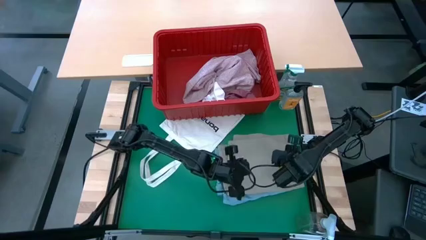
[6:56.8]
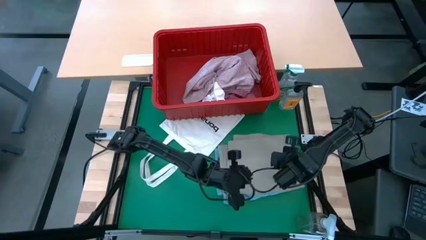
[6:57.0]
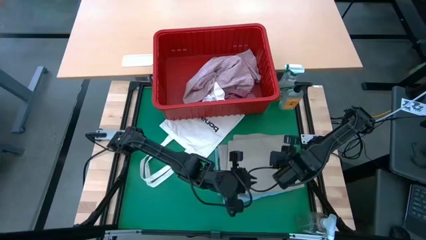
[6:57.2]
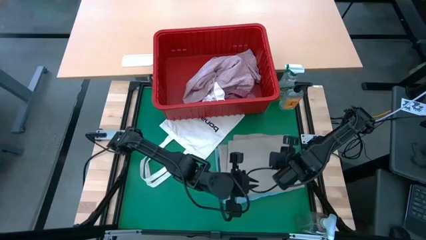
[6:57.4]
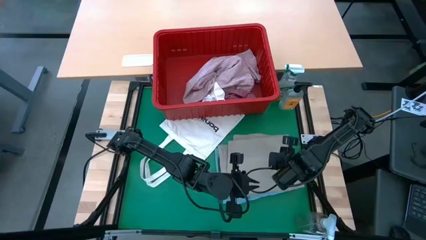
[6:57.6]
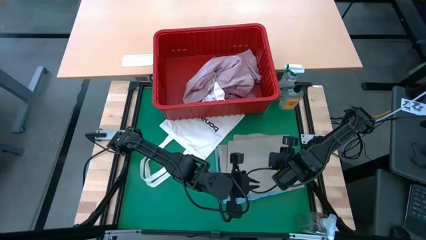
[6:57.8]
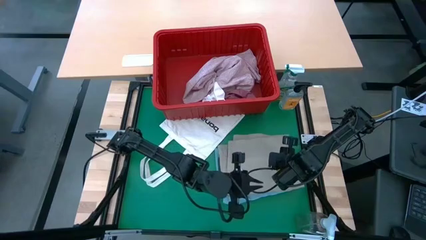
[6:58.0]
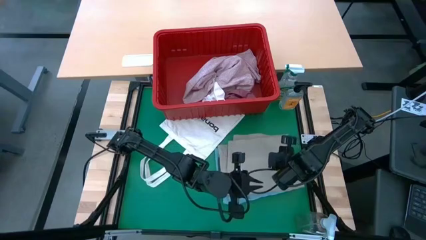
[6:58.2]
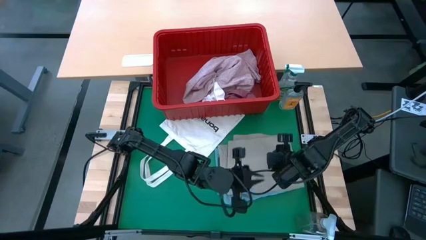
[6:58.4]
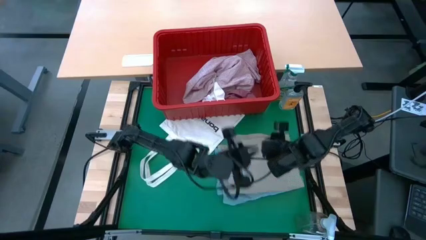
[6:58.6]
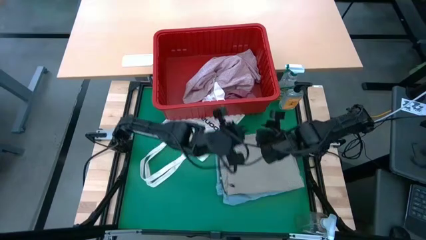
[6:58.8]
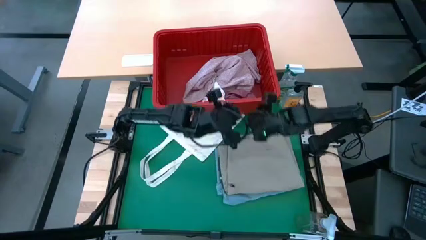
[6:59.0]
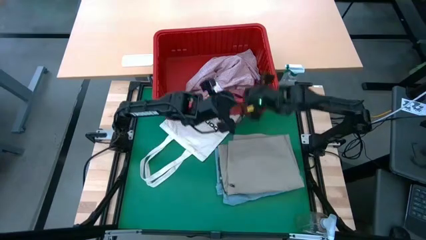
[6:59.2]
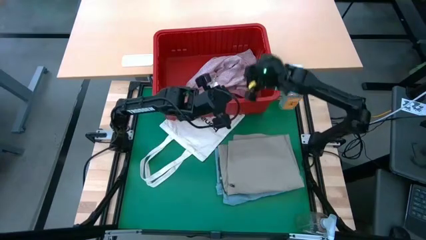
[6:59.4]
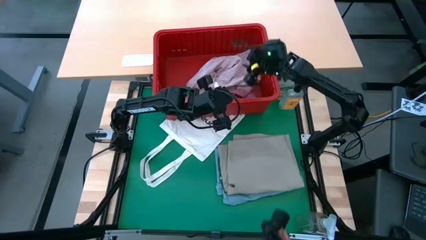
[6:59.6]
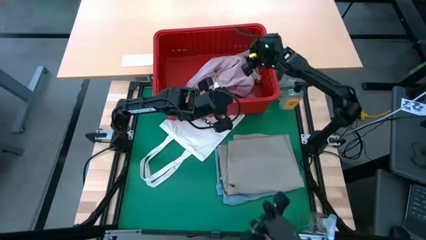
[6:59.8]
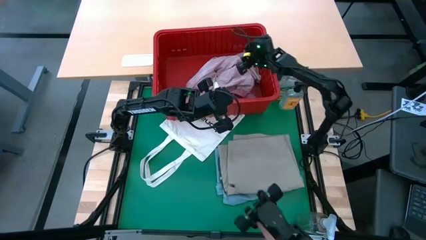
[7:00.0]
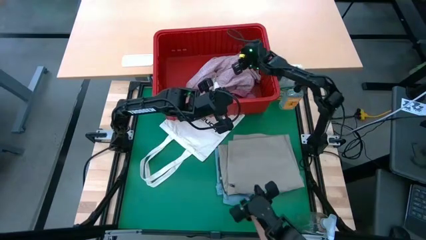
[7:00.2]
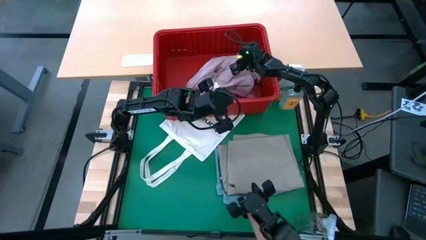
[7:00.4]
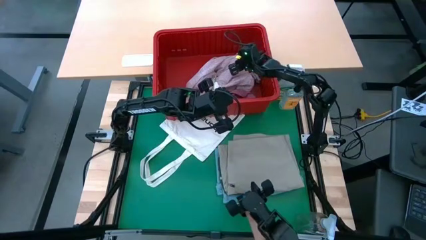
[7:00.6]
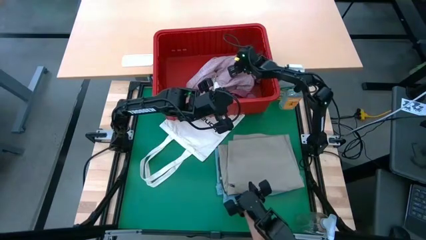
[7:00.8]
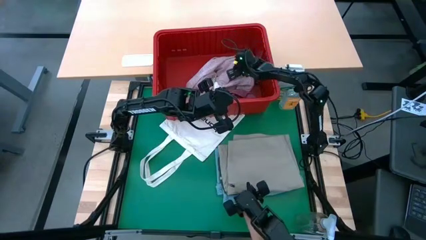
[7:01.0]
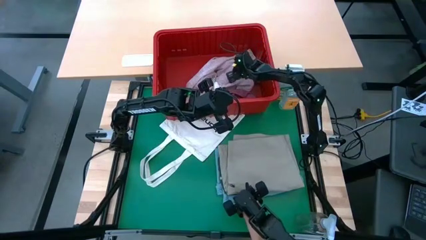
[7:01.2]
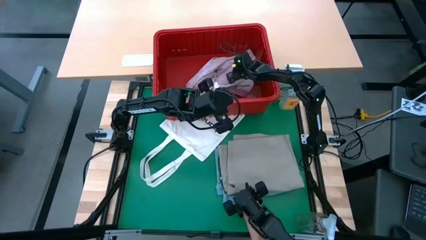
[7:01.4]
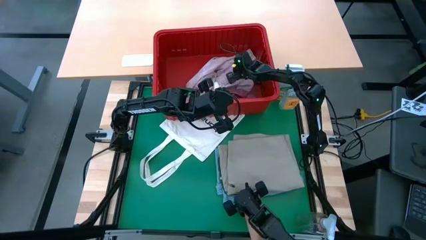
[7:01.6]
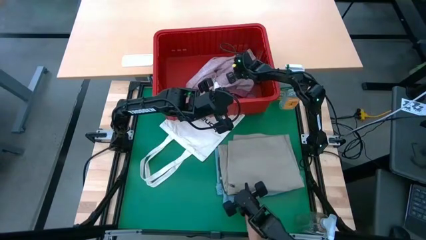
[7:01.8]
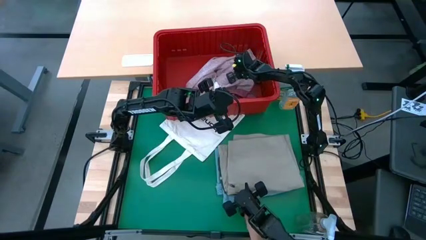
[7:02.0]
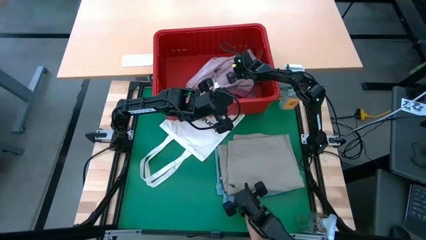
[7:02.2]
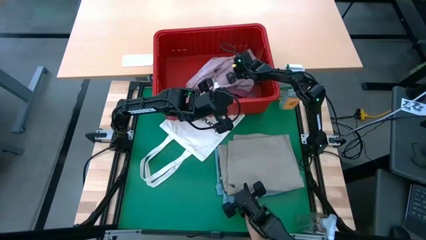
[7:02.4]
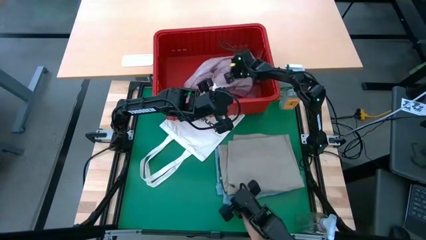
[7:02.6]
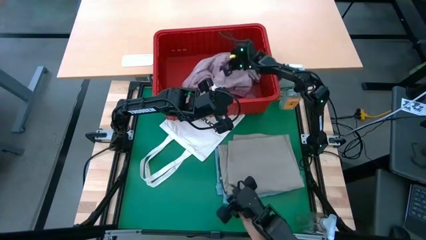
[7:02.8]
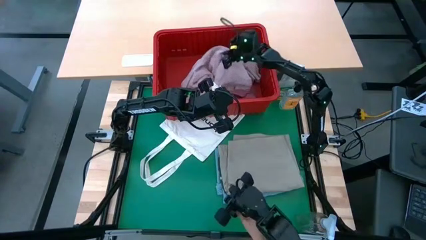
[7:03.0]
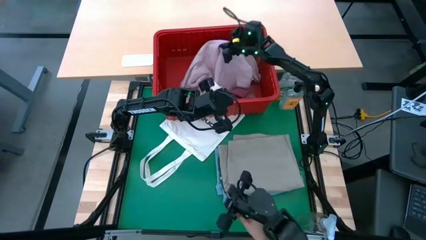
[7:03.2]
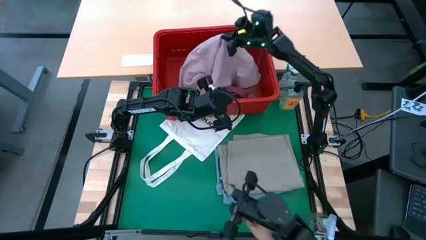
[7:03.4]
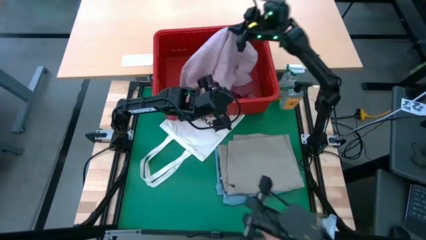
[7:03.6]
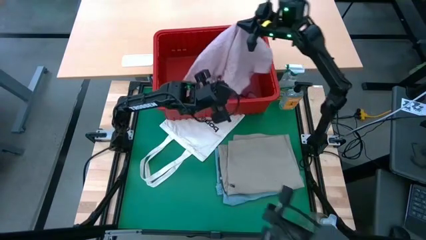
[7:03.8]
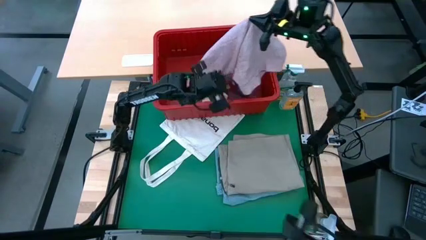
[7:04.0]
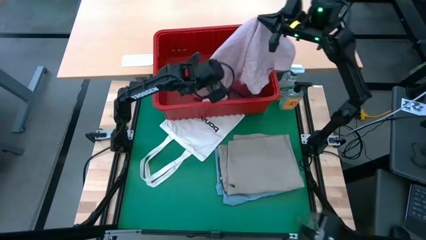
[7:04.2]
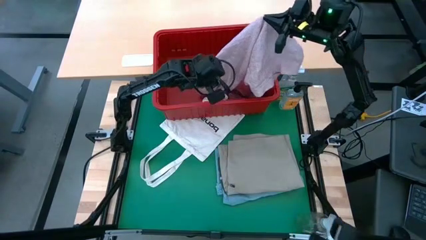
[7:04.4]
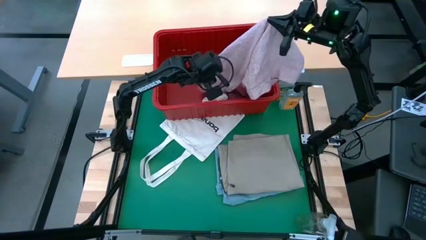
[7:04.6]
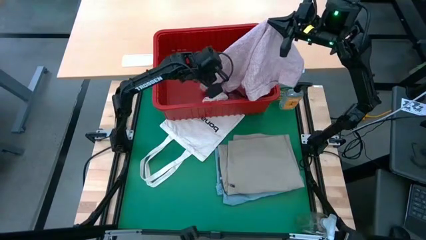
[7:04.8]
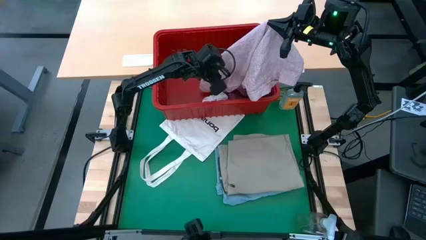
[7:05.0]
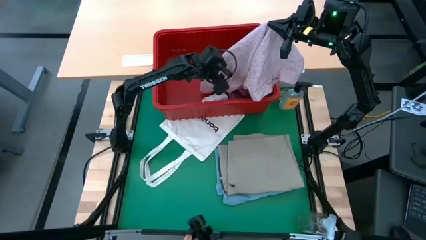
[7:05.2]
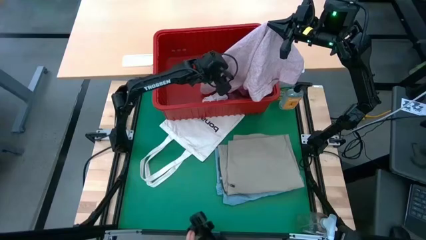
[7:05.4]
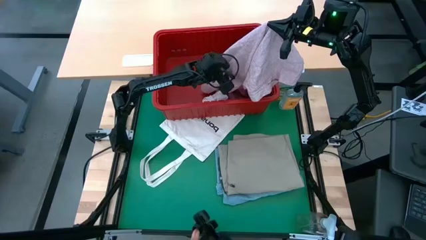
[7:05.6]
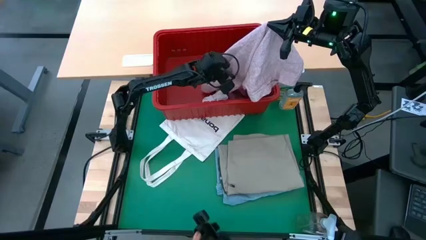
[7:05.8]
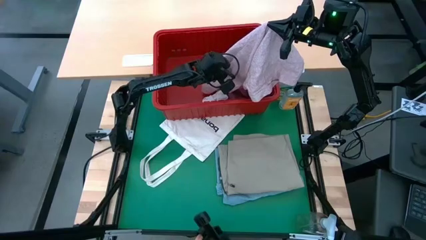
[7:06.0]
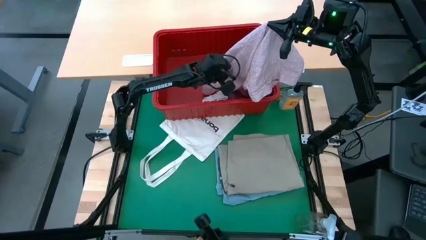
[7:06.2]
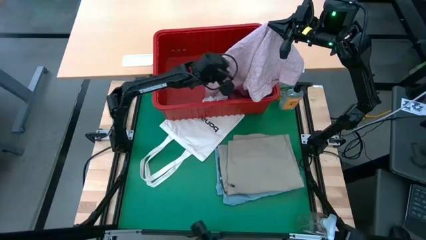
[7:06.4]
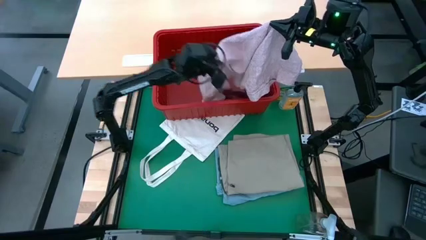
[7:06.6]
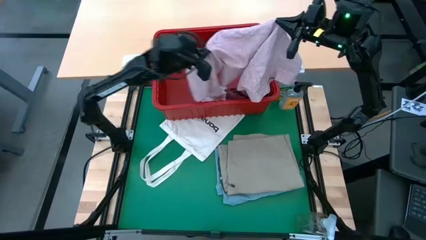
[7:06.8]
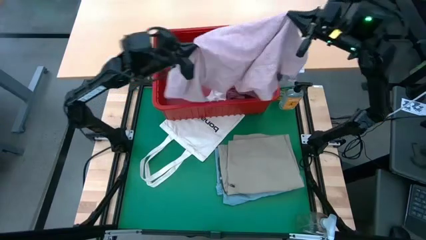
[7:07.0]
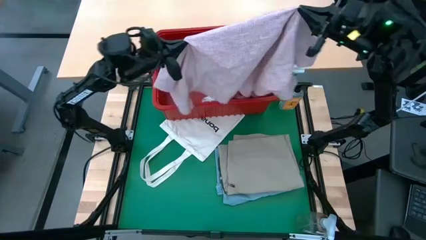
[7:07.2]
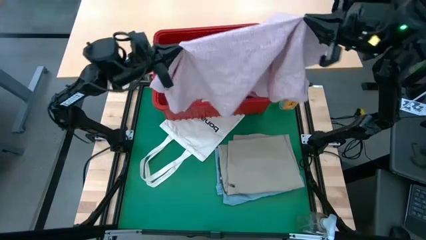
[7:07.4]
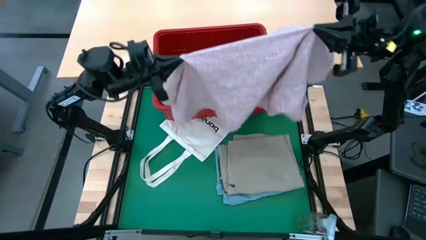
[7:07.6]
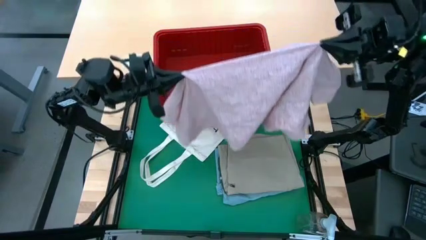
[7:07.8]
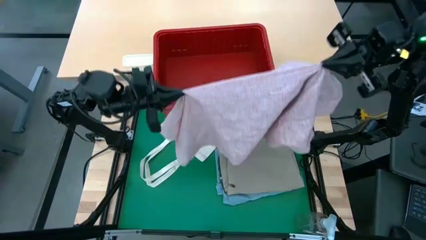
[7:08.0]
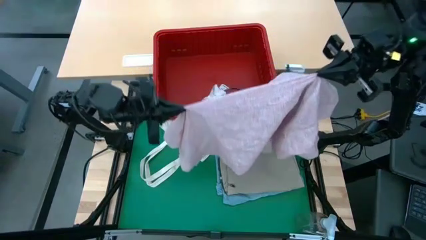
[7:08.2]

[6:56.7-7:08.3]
Task: Fold laundry
Fold the pink shirt

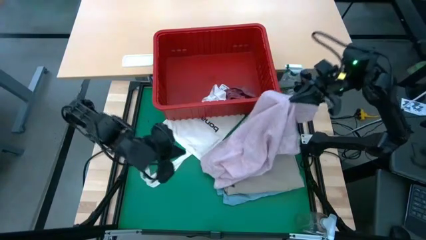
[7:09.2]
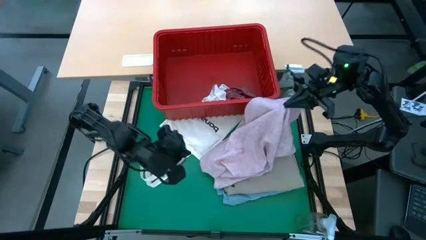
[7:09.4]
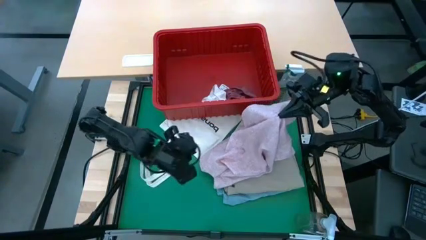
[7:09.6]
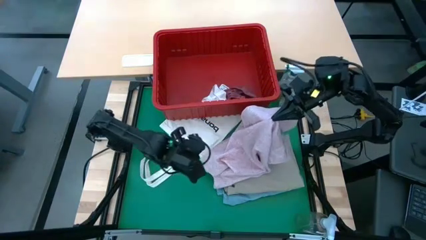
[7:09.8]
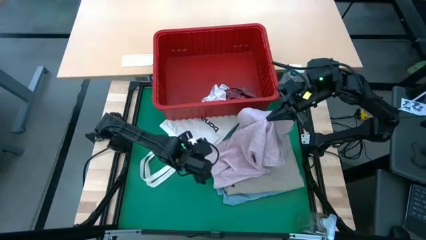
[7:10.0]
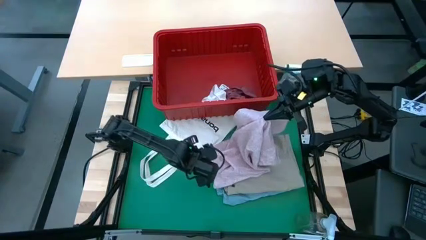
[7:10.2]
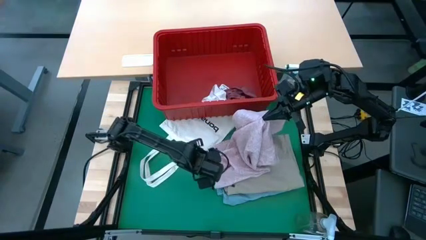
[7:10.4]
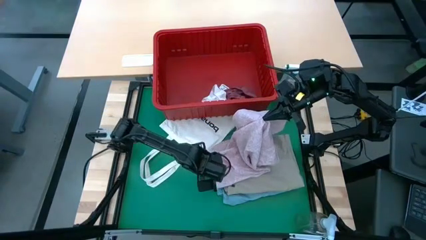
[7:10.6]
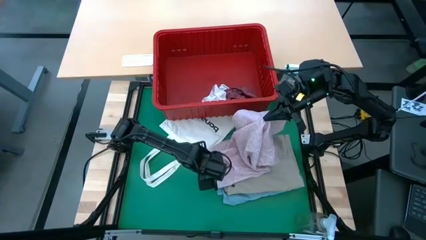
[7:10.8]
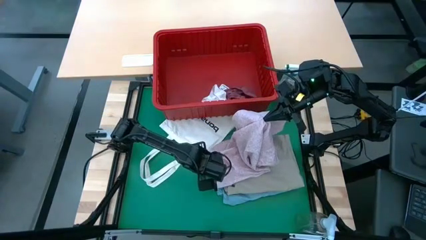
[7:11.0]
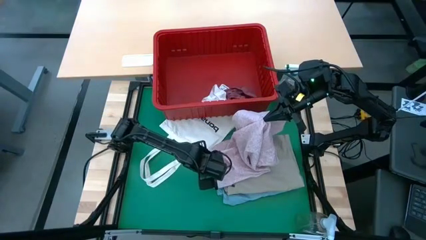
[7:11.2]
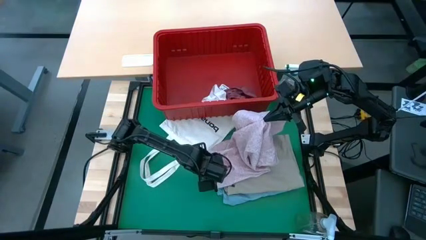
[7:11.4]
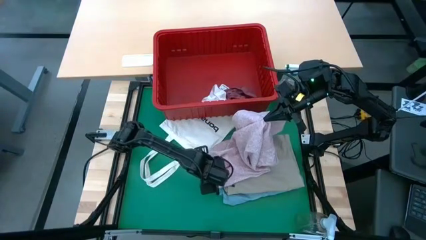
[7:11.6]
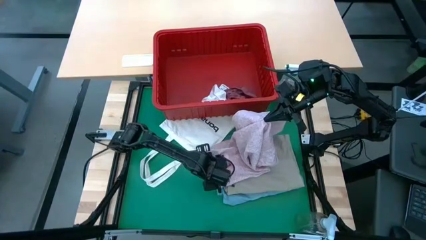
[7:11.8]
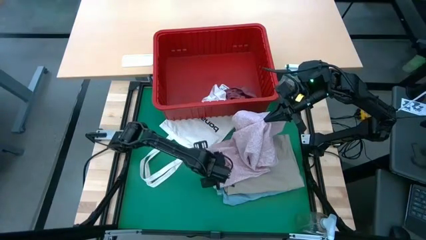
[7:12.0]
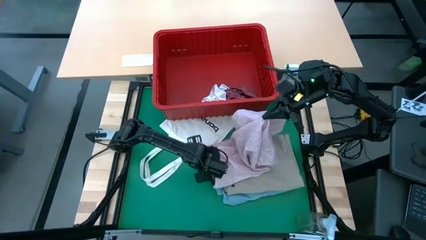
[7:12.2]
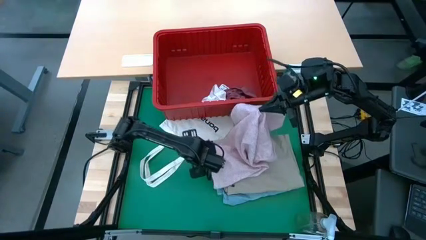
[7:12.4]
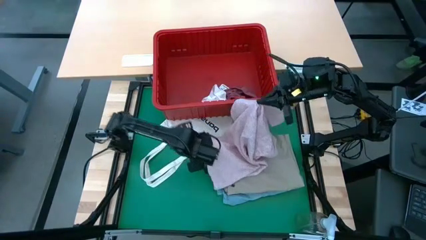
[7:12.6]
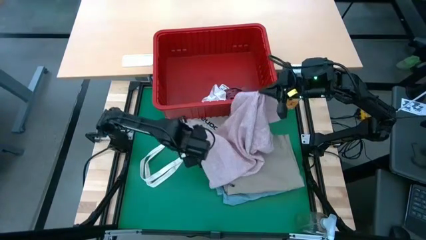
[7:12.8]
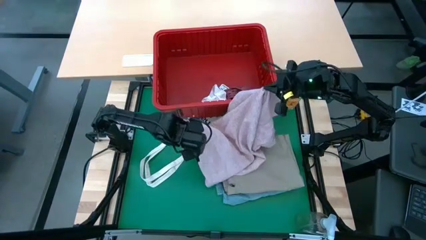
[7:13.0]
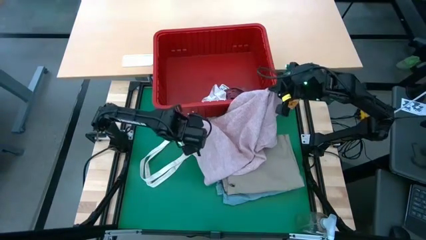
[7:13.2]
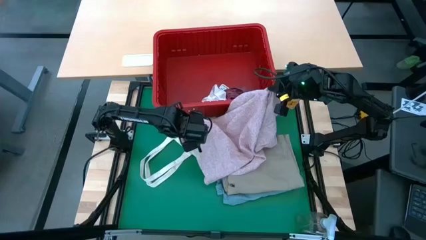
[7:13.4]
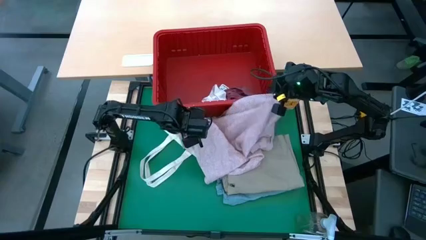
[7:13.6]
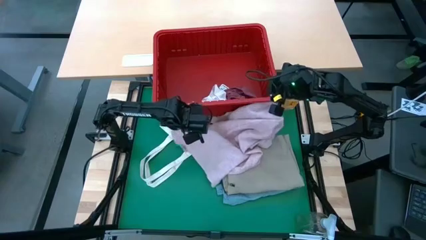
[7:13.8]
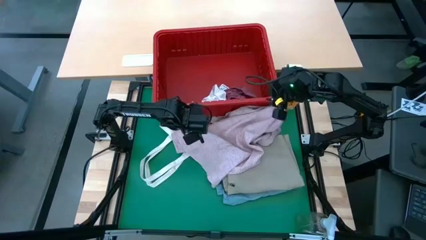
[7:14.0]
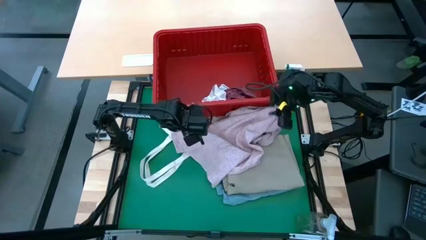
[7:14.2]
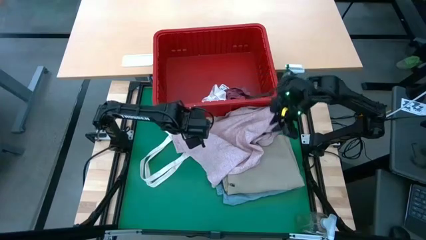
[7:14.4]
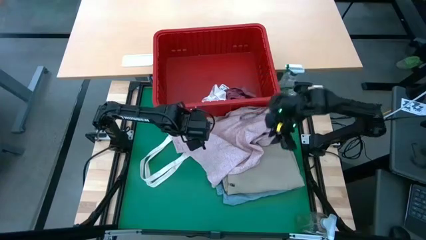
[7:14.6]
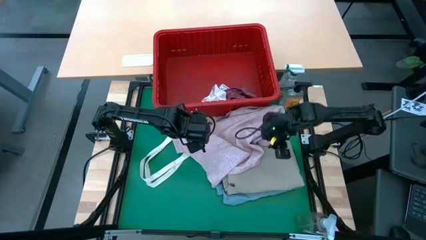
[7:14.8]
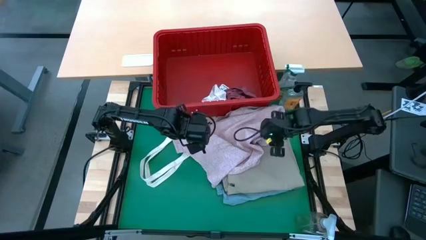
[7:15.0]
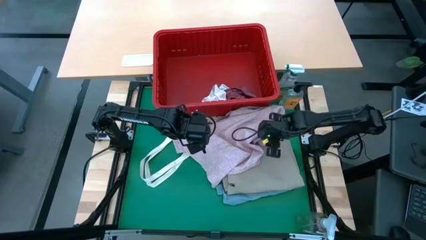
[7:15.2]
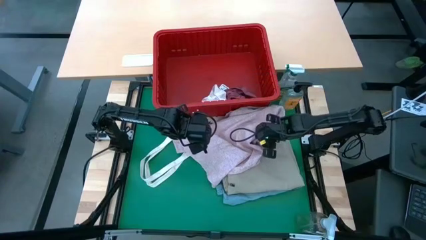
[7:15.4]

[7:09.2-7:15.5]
Fold the pink shirt

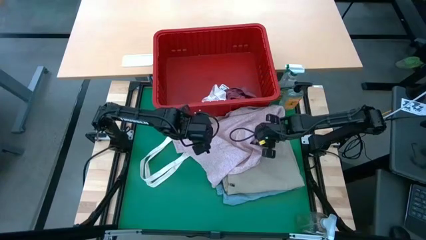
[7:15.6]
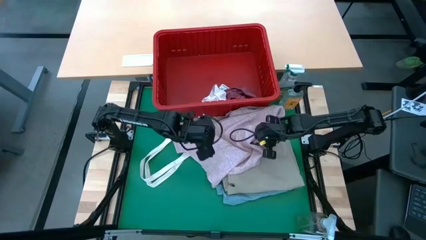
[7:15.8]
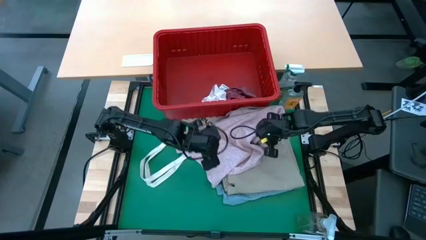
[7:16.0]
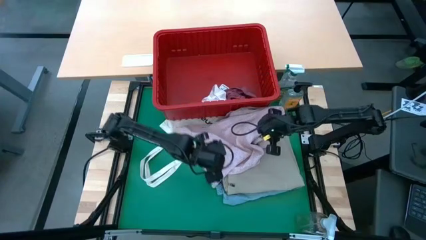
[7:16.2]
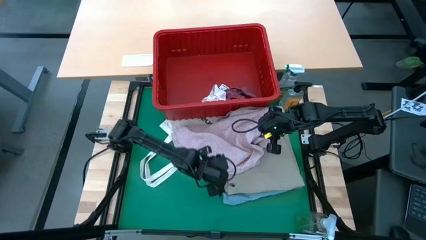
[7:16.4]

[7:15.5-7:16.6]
Fold the pink shirt
